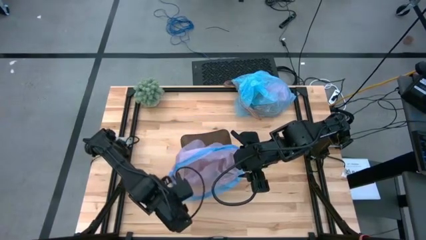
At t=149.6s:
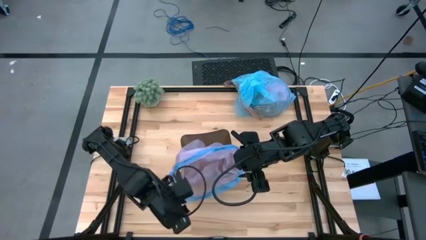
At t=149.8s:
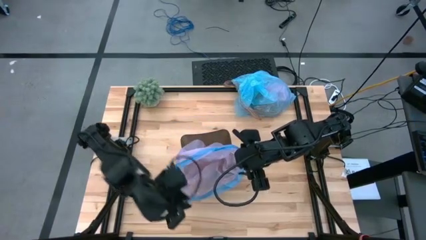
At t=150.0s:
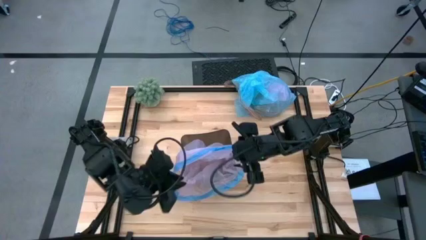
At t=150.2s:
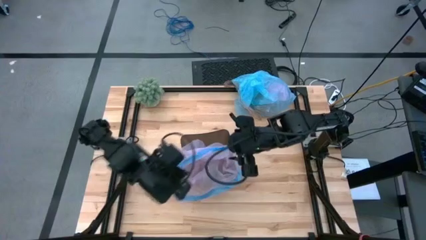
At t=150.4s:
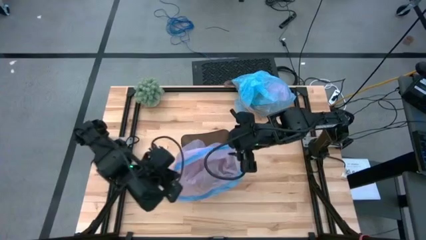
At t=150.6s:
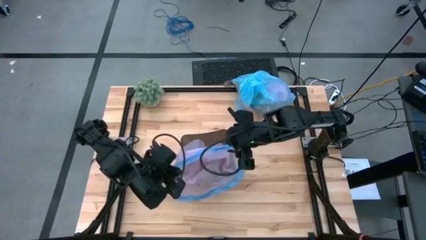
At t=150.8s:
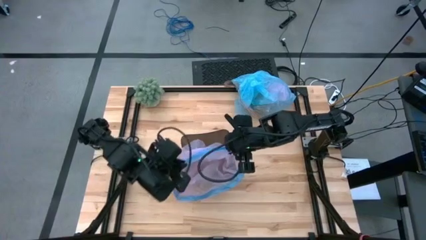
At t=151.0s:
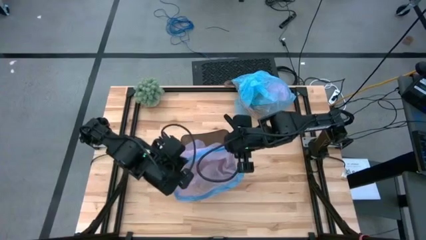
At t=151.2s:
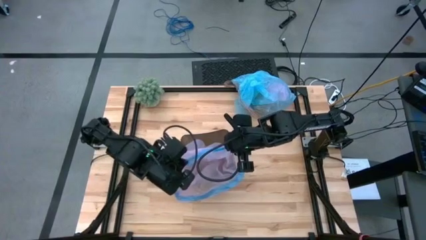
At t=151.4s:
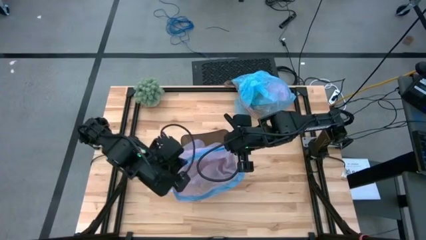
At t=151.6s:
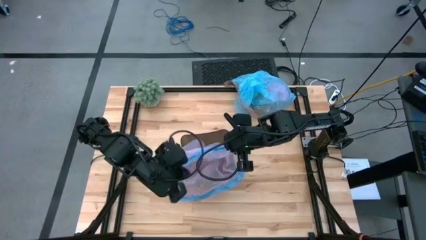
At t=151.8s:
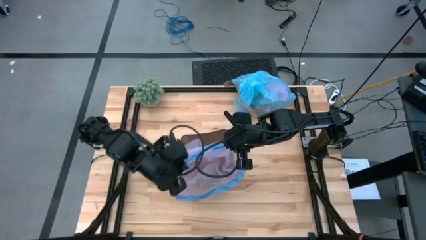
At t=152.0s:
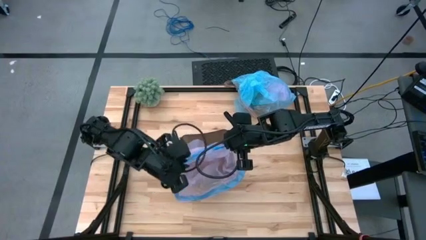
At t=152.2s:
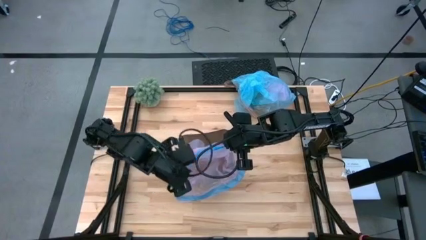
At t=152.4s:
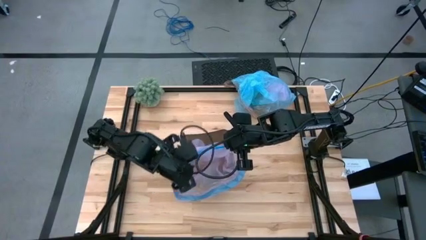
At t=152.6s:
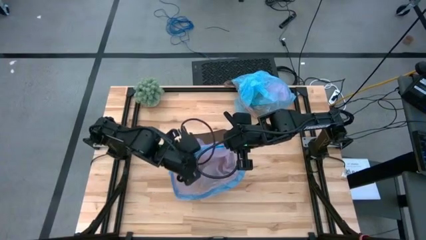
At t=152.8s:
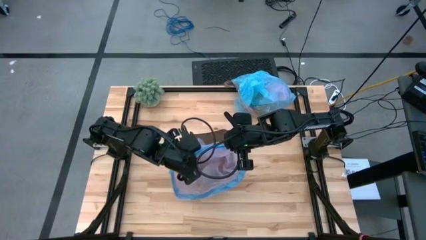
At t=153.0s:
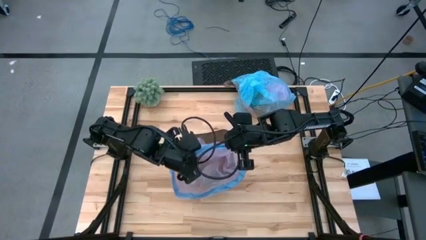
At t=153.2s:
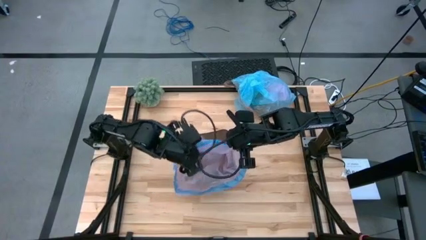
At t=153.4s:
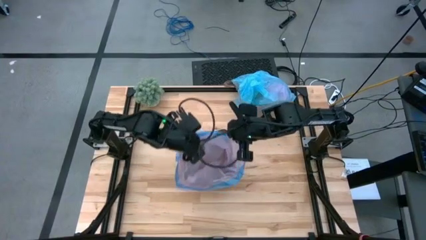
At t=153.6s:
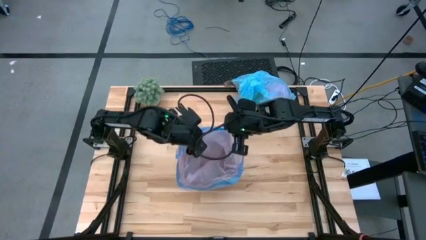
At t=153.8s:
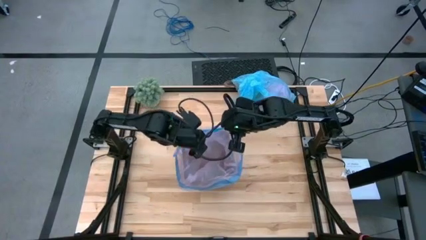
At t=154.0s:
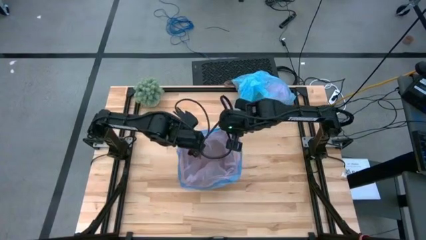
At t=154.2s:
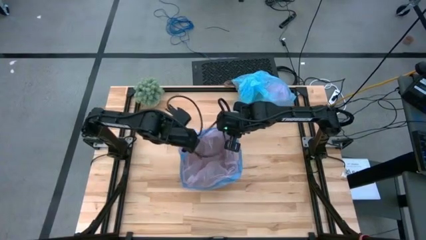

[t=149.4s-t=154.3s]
Task: place trash/remove bag and relplace
Insert the pink trash bag into the trash bin

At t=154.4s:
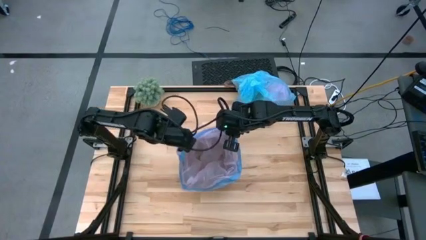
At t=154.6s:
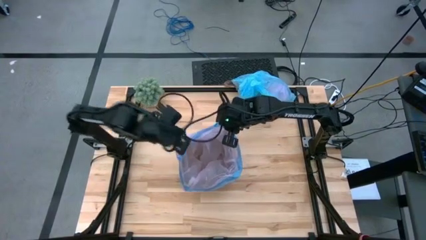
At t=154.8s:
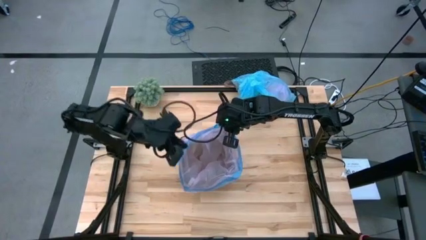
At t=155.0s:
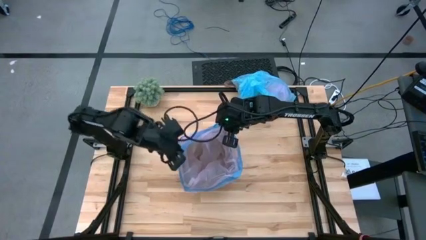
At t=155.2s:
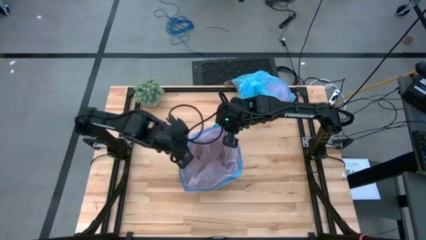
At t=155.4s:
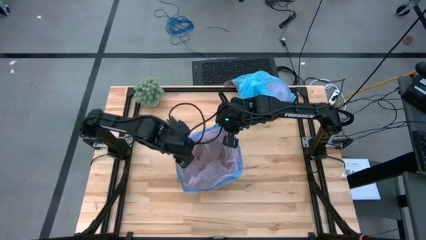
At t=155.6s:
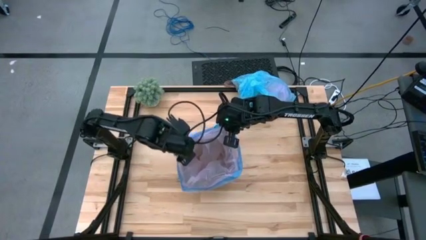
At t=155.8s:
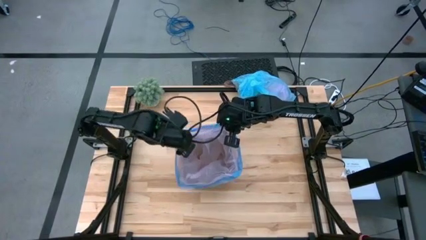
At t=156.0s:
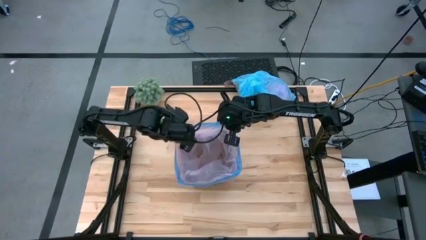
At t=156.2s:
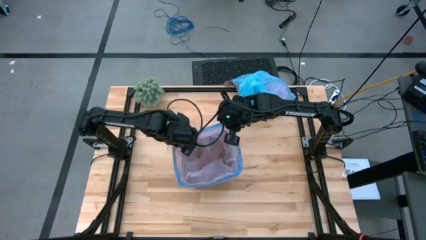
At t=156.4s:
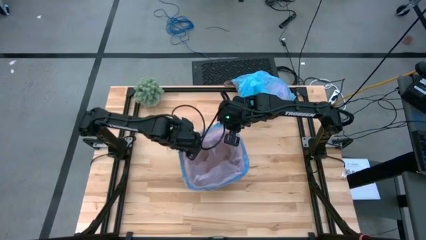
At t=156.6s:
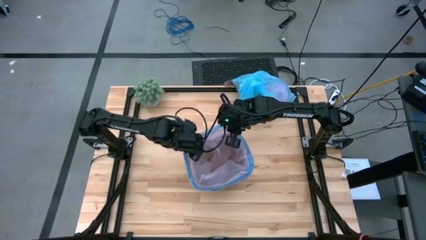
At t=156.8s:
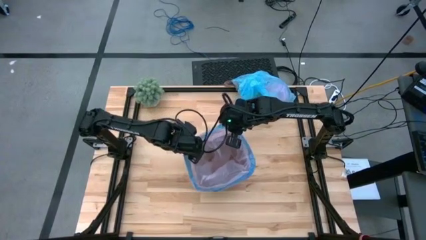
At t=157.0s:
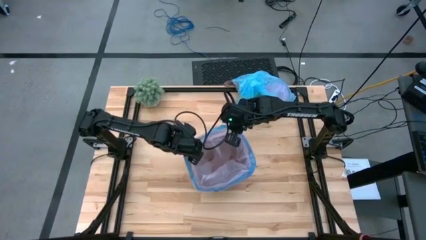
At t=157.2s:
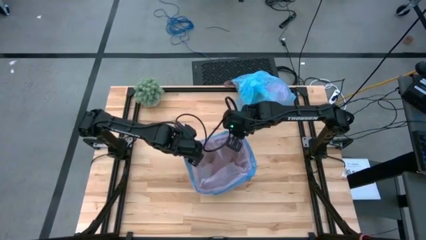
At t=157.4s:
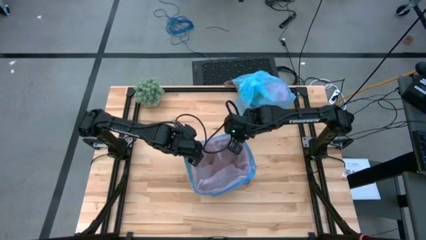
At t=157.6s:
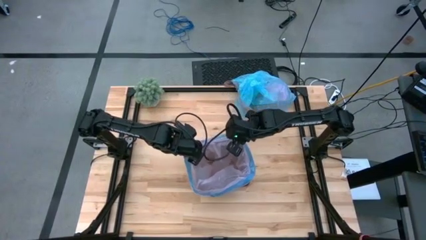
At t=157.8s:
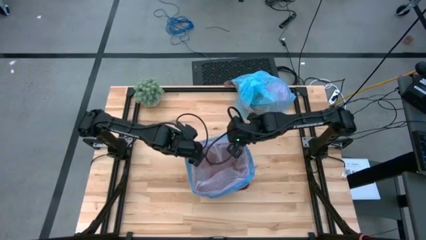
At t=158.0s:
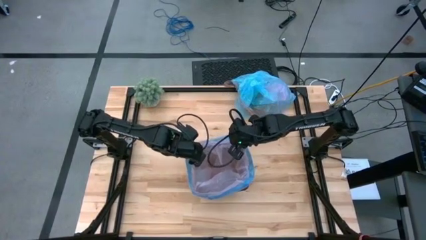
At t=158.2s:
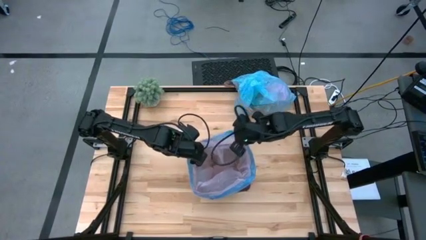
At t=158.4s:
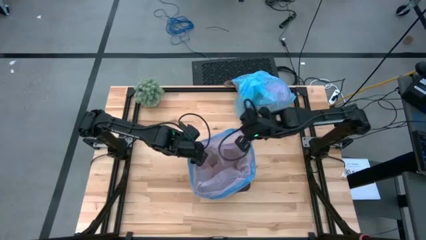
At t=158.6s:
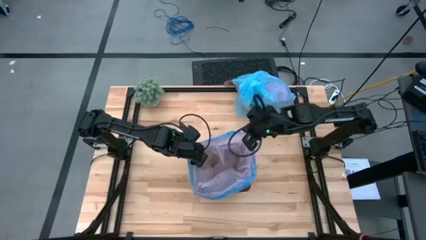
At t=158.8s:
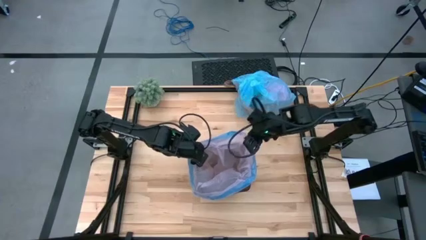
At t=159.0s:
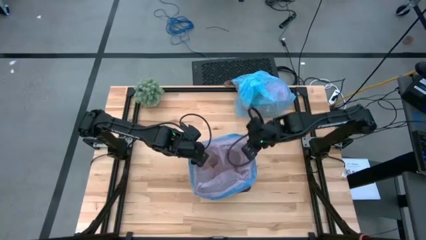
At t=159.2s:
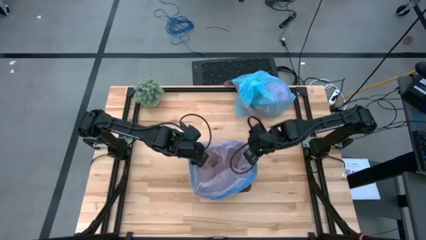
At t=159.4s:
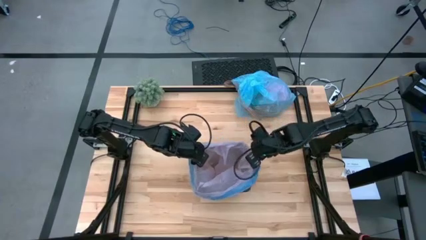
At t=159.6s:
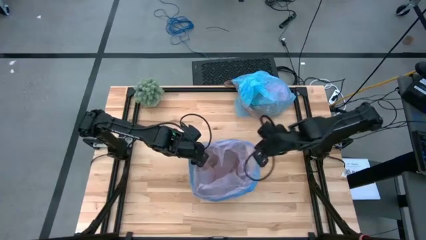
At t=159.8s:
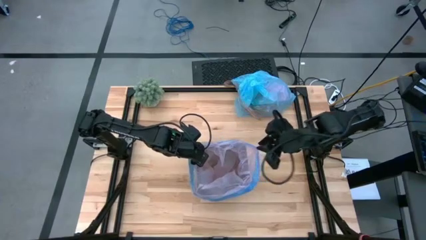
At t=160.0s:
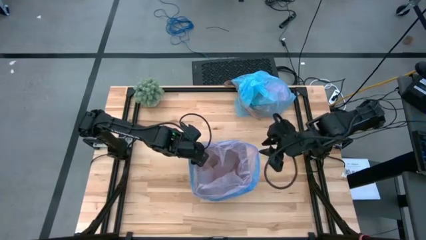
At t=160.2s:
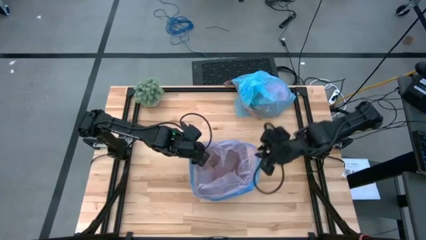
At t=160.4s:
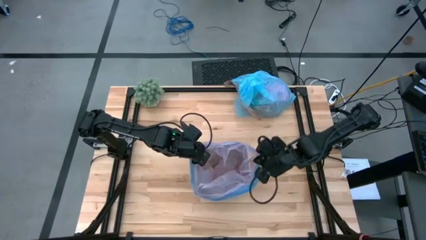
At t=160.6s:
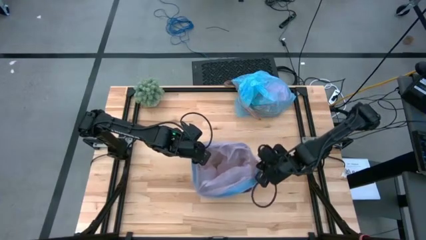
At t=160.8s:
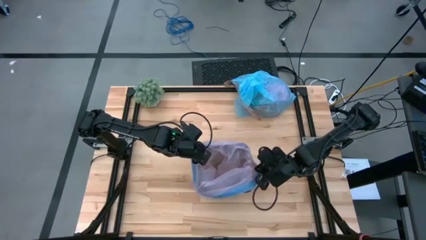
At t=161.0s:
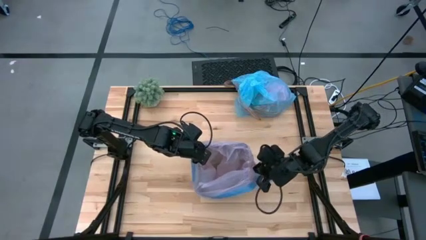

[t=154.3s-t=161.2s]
Insert the pink trash bag into the trash bin

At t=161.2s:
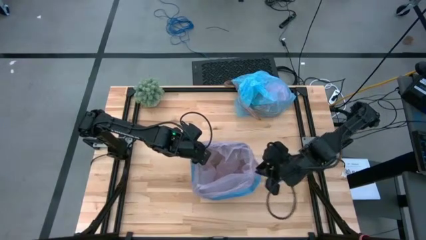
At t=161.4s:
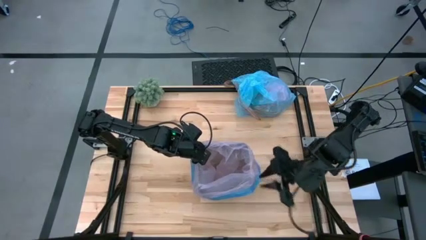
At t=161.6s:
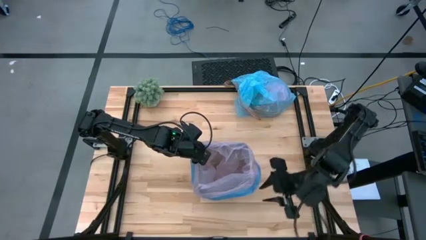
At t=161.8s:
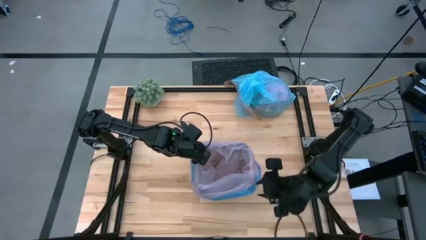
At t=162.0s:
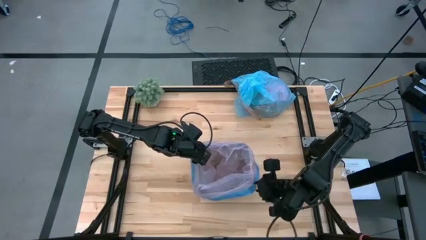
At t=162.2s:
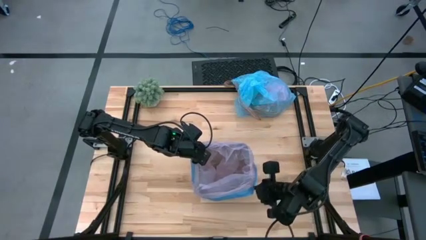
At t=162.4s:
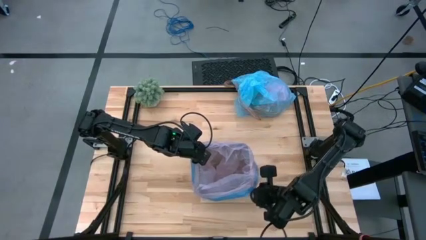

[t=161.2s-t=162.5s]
Insert the pink trash bag into the trash bin

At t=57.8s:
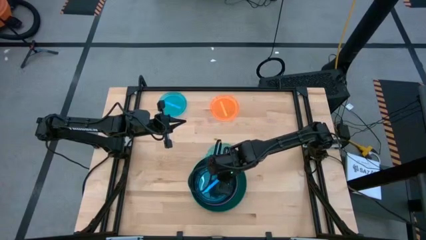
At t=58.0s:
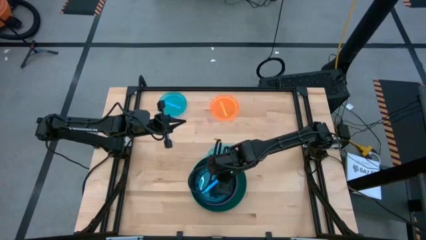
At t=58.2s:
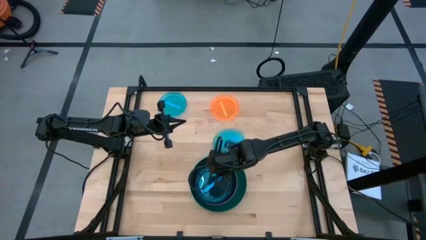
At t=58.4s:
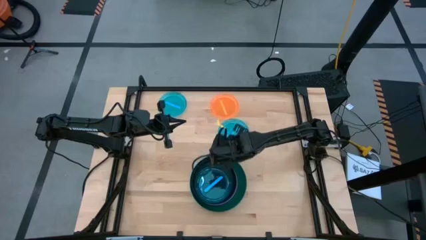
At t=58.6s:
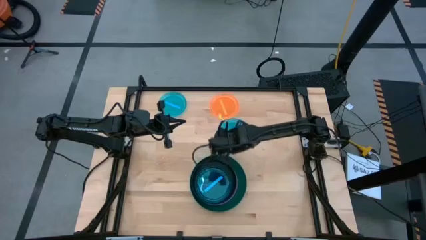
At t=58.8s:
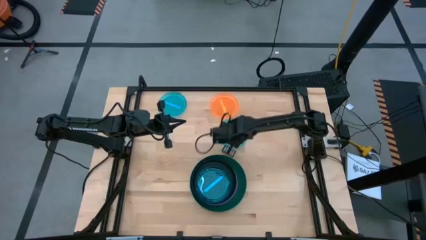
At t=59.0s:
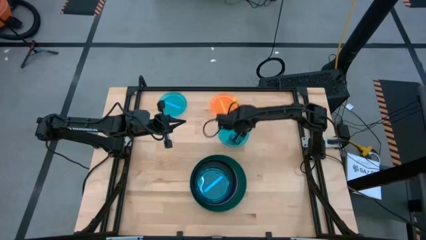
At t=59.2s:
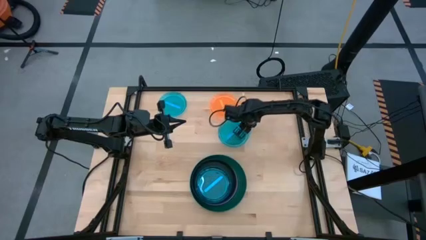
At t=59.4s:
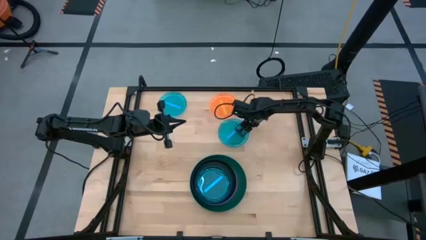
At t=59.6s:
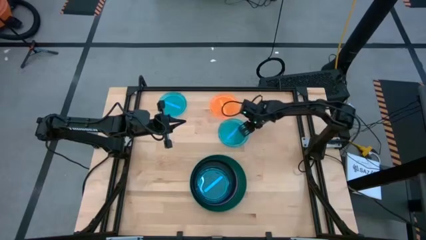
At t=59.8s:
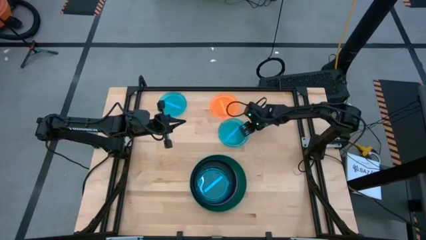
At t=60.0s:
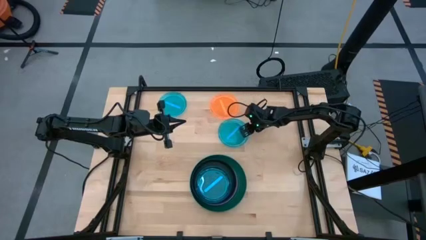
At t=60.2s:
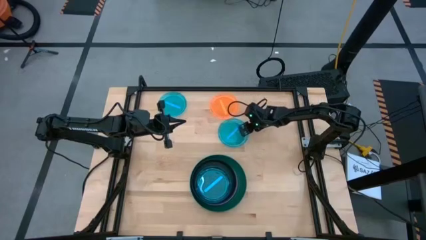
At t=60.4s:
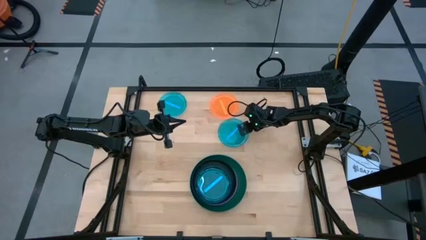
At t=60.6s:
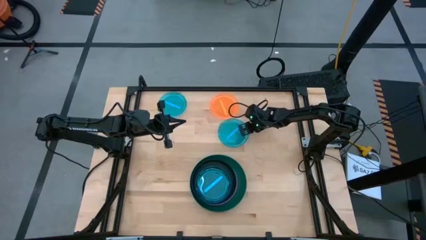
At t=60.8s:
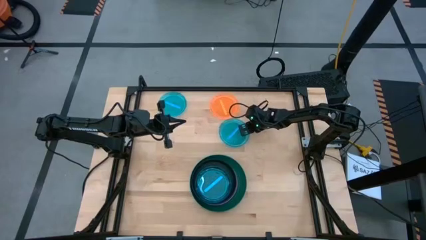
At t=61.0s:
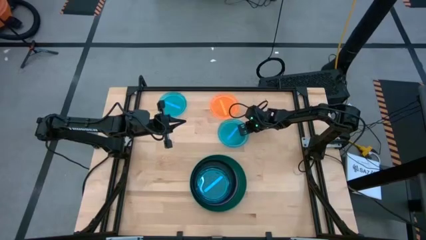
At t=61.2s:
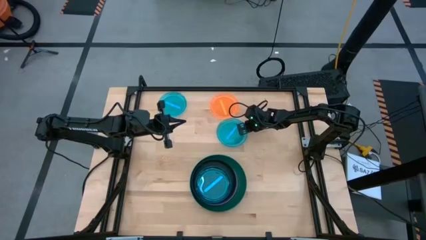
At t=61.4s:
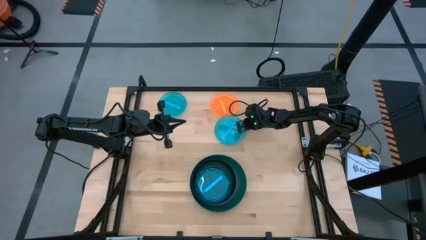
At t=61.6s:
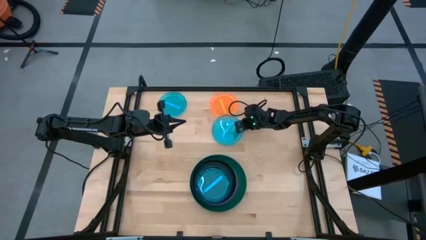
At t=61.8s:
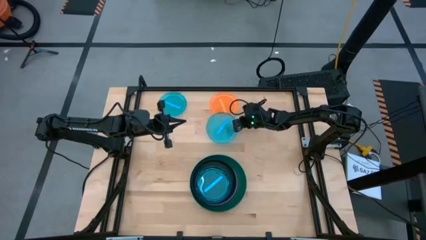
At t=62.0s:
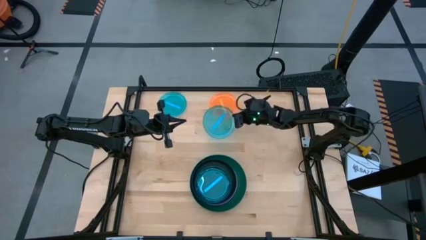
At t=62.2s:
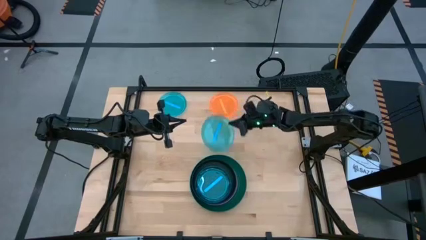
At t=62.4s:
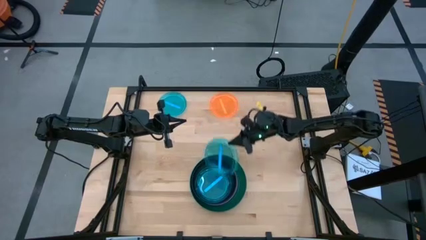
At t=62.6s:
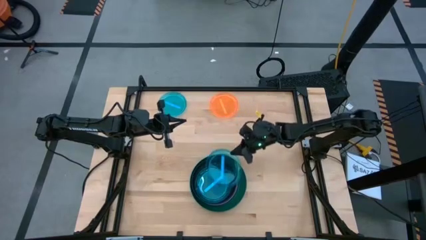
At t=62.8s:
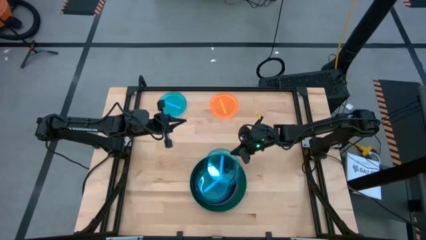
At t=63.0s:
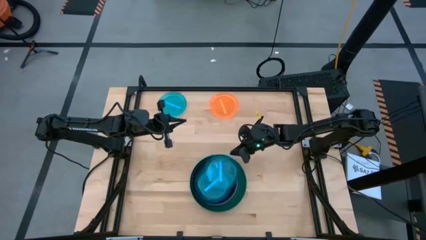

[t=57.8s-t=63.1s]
Task: Stack plastic plates
Stack the right blue plate on top of the blue plate
